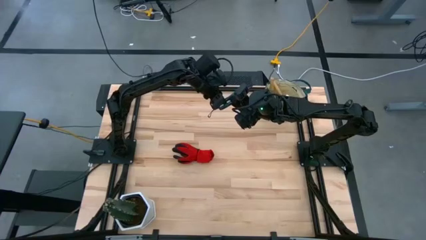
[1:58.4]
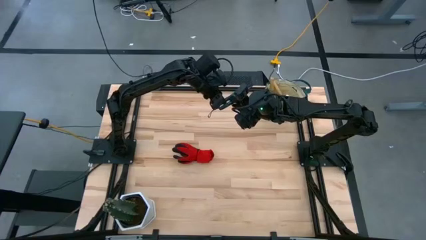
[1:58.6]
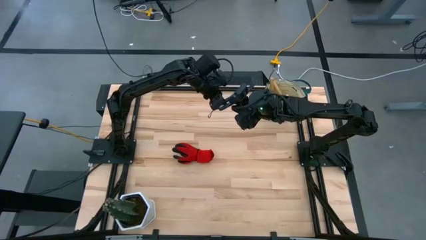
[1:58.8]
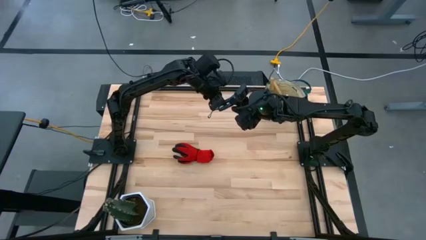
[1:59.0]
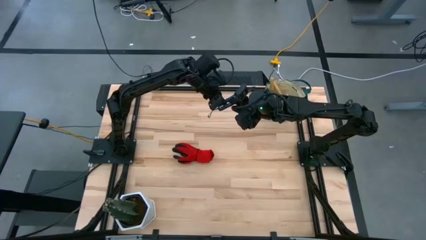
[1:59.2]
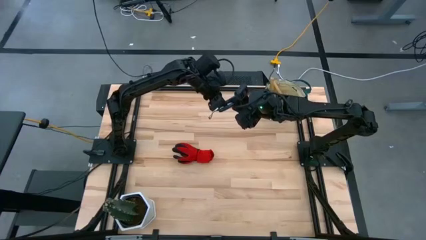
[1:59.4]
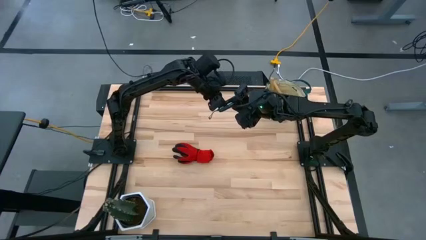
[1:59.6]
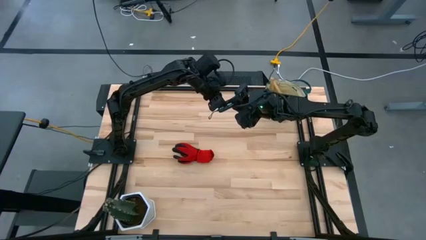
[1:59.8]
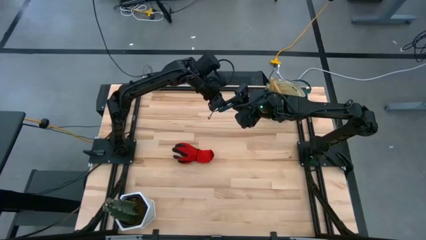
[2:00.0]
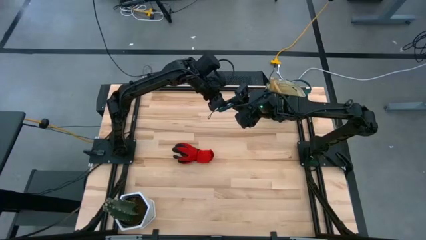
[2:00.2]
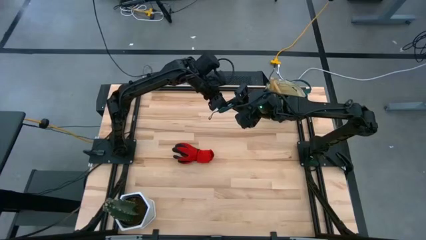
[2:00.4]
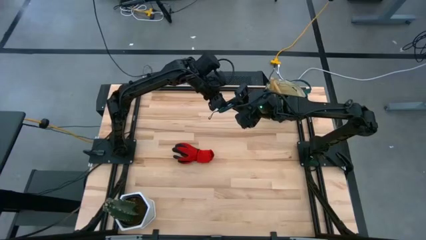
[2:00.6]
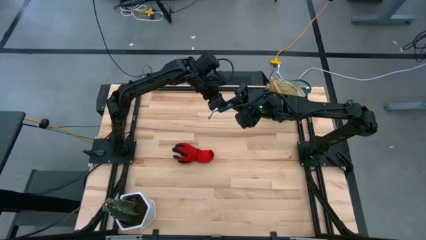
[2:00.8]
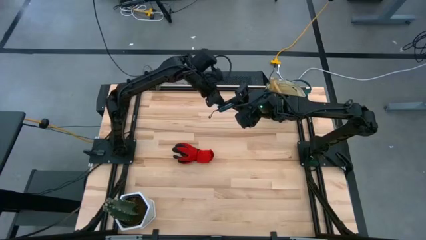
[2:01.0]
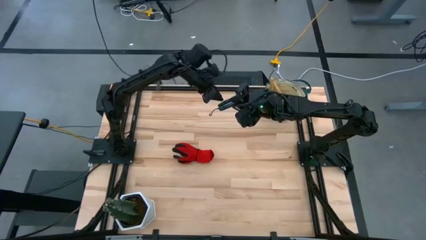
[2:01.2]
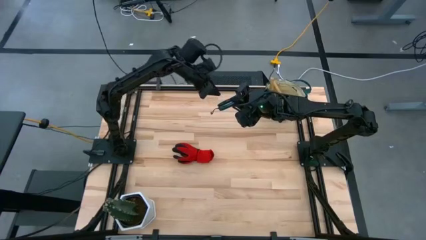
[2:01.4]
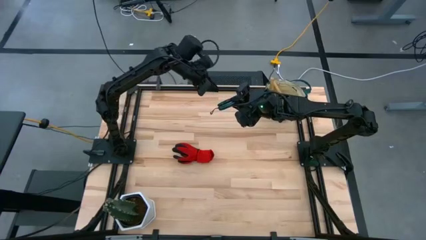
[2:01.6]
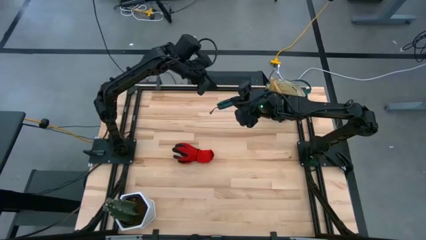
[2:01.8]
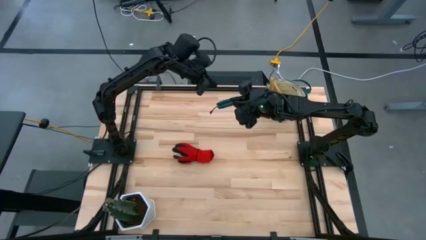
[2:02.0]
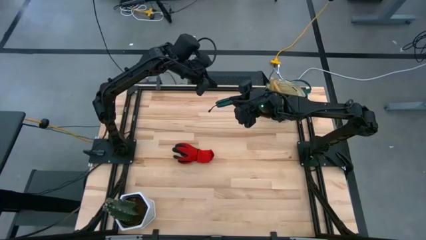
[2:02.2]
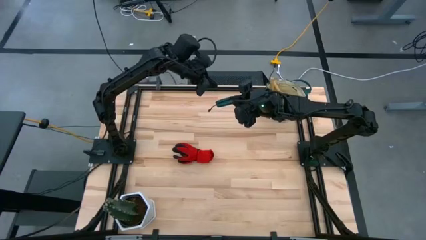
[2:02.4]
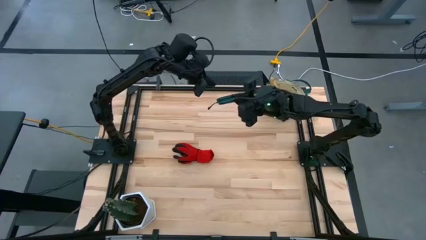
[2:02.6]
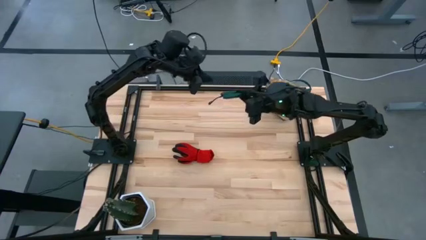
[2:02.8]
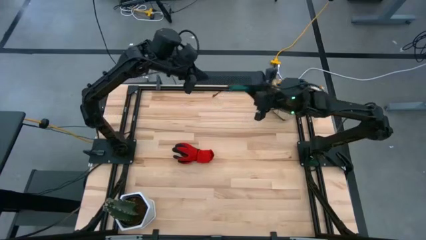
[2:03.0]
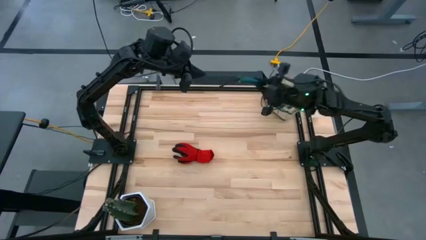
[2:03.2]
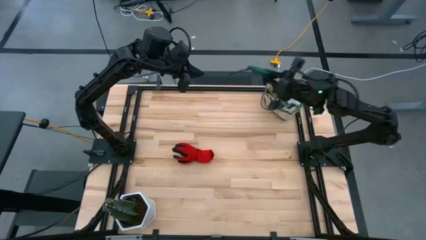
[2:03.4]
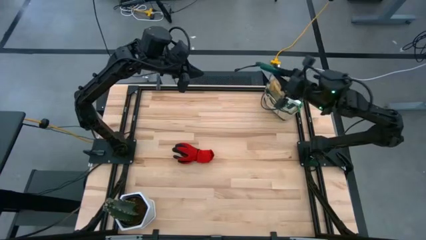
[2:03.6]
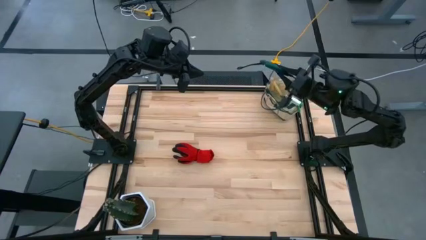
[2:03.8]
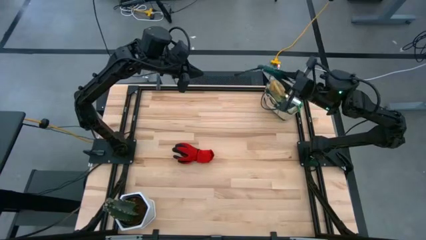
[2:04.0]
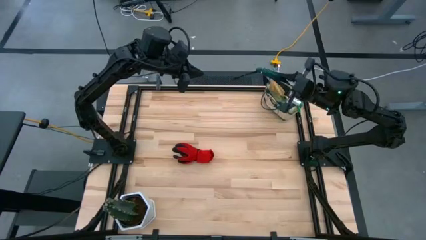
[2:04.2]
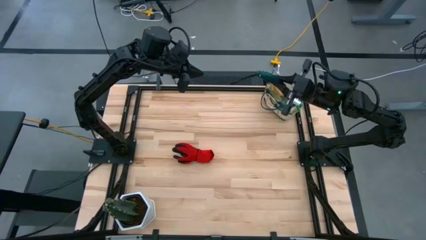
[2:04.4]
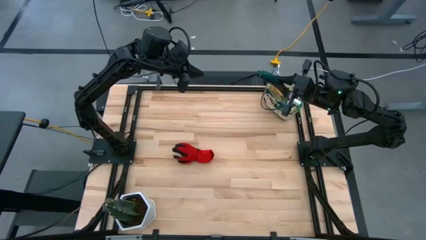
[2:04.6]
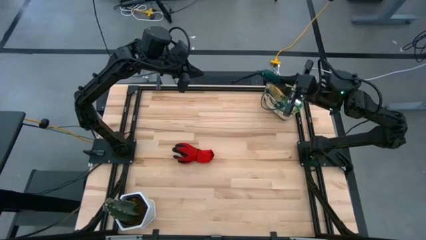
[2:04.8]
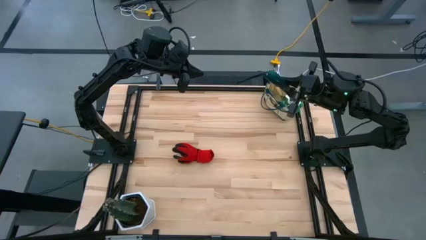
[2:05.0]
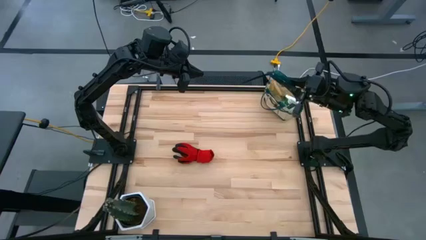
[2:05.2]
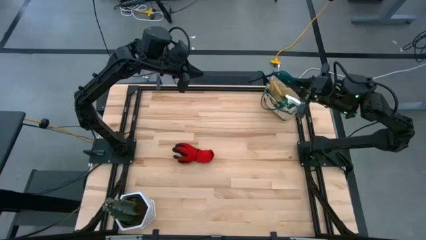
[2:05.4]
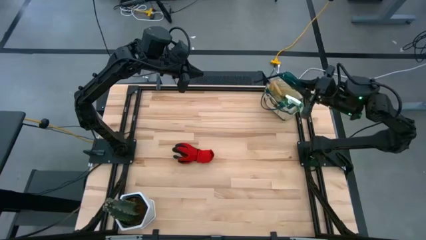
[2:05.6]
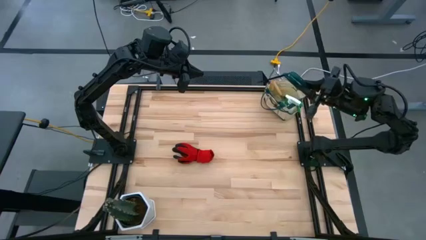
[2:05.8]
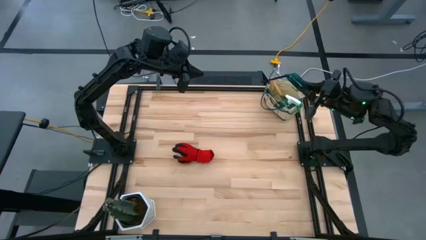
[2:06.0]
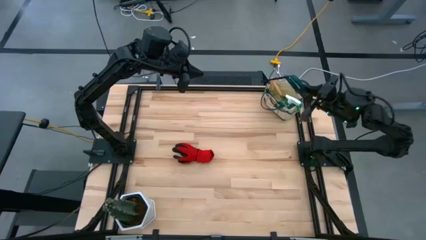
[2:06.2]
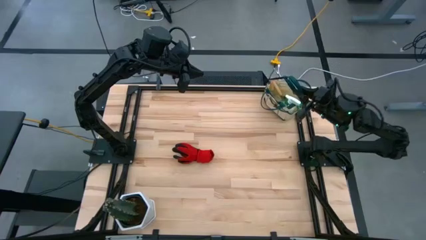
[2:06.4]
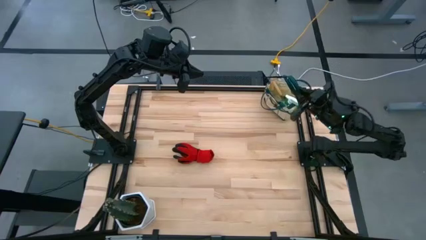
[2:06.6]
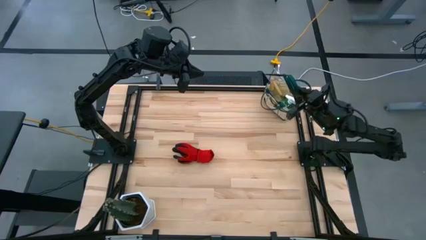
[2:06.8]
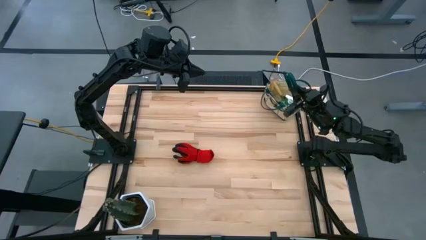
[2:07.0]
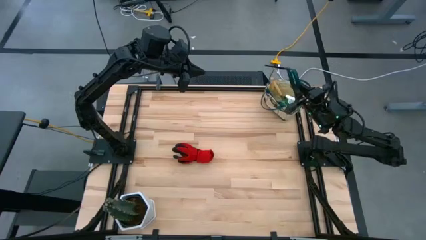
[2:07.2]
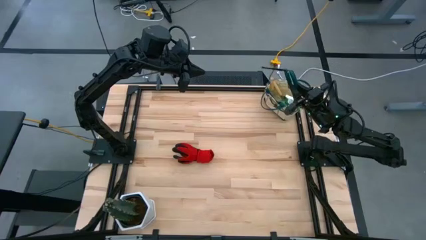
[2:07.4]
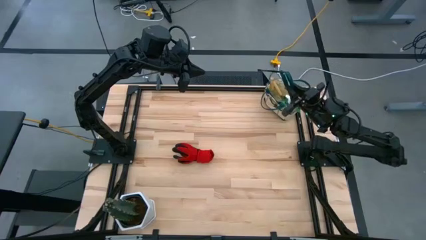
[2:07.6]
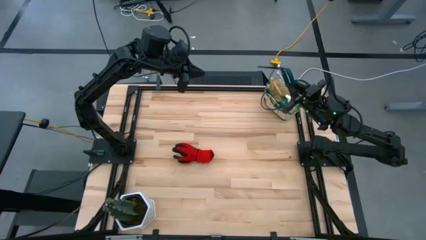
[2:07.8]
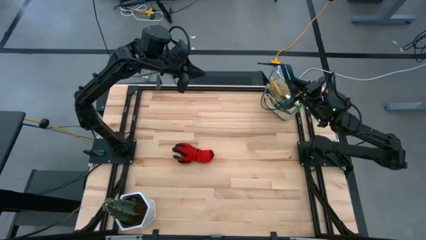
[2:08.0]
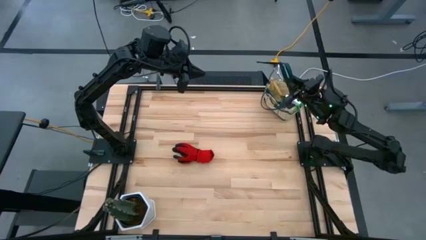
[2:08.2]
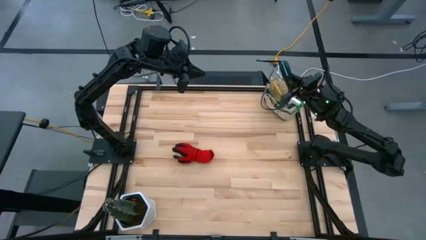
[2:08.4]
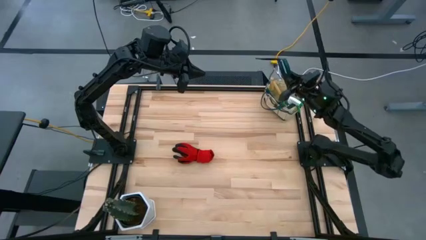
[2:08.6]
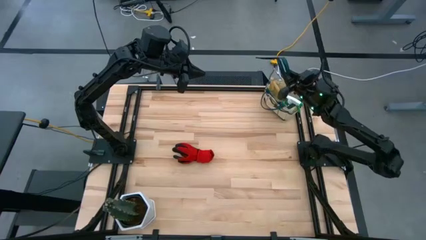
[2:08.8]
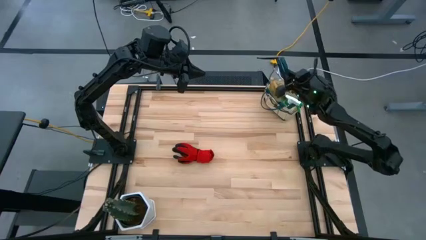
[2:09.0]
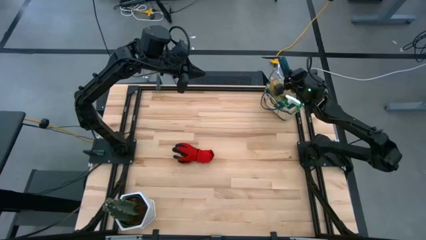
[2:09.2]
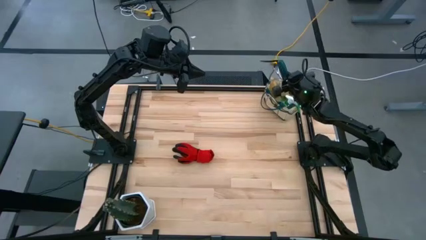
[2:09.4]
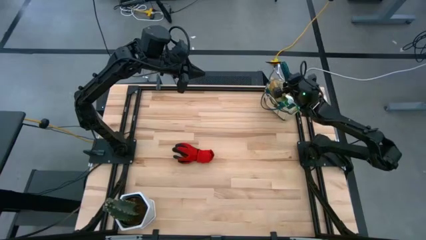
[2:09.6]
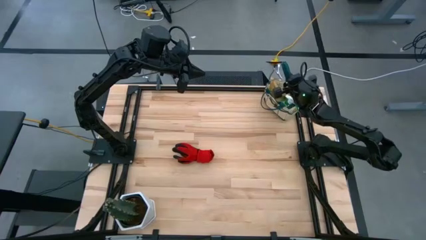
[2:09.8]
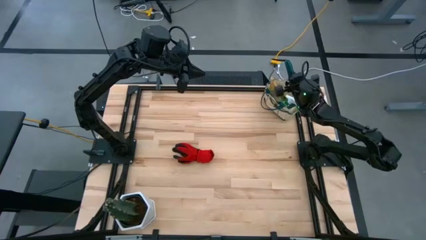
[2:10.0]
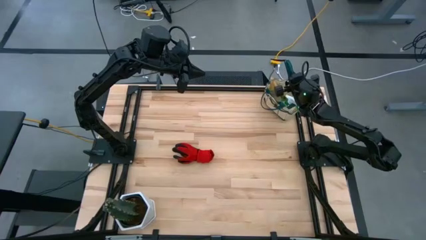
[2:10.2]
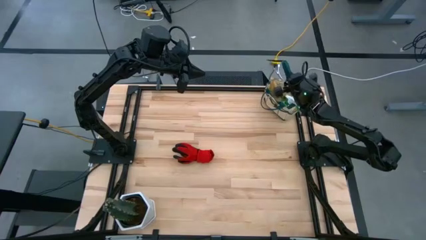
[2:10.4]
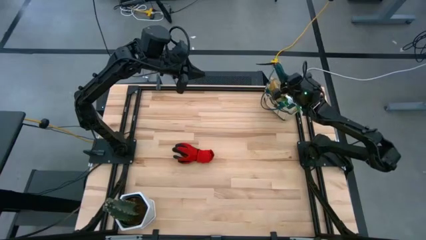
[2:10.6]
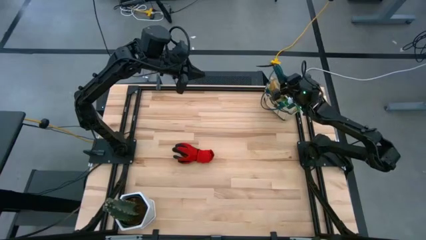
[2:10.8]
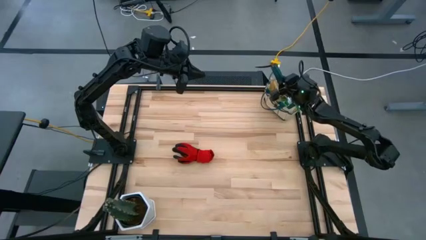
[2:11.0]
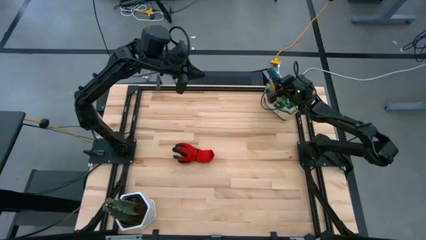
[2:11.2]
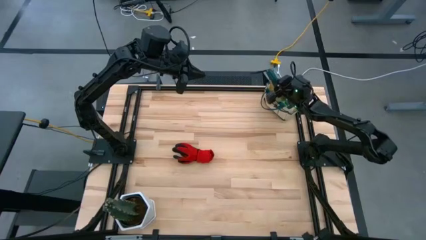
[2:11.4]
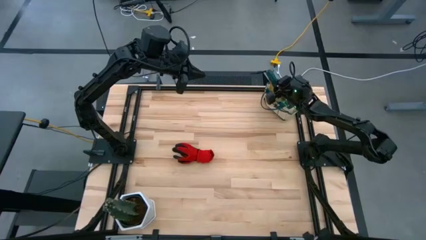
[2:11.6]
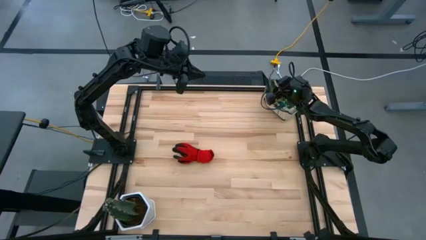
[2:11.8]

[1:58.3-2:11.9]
Task: Pick & Place Garden tools in Gardening bag
Put the green shear scissors into the gardening bag
